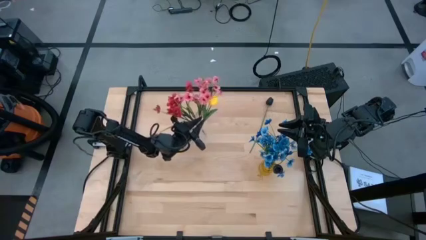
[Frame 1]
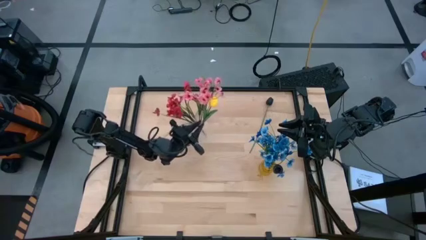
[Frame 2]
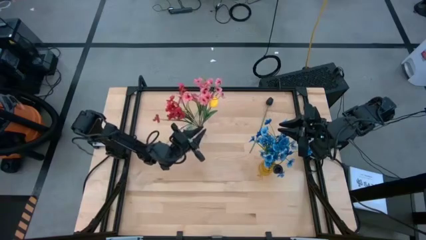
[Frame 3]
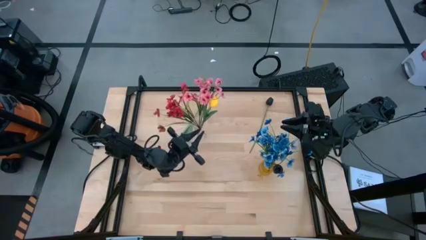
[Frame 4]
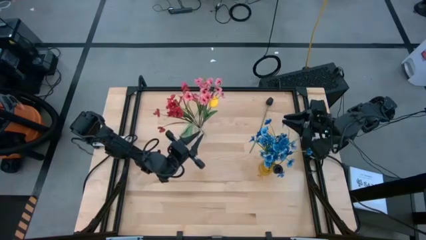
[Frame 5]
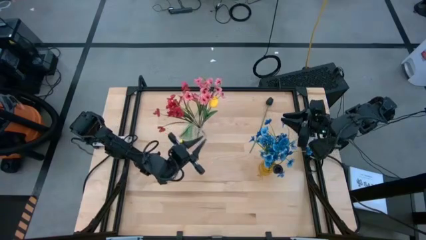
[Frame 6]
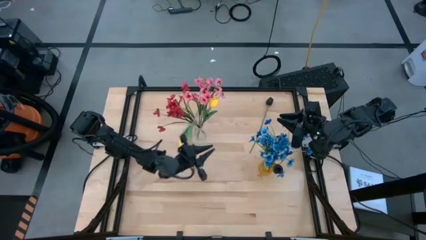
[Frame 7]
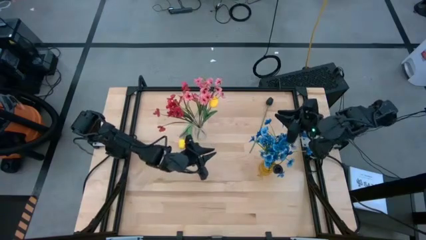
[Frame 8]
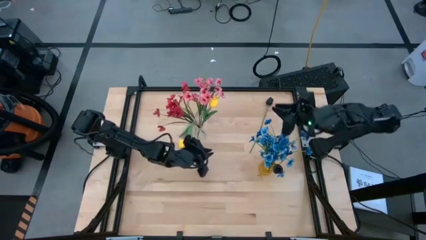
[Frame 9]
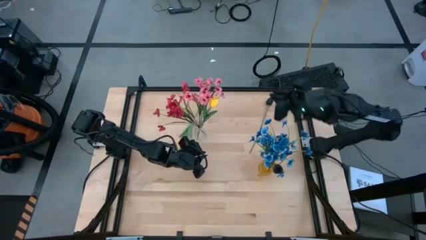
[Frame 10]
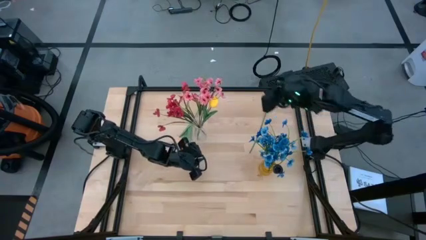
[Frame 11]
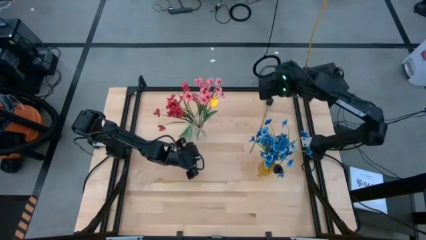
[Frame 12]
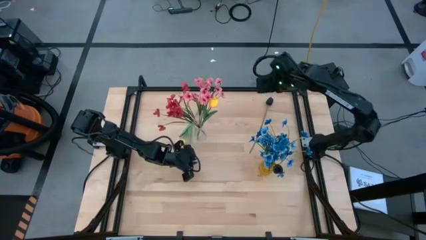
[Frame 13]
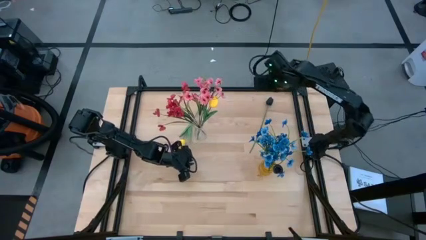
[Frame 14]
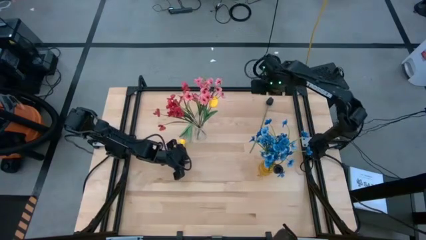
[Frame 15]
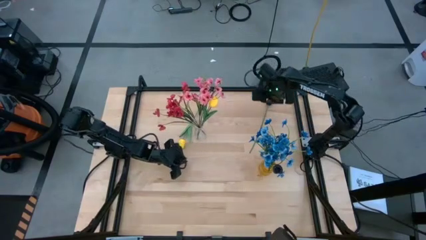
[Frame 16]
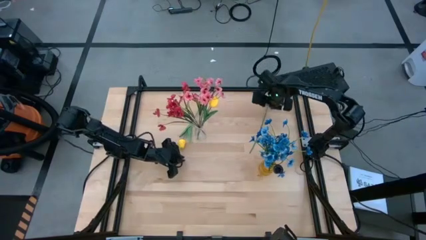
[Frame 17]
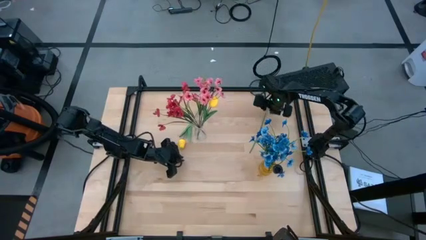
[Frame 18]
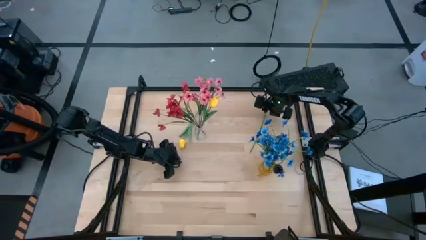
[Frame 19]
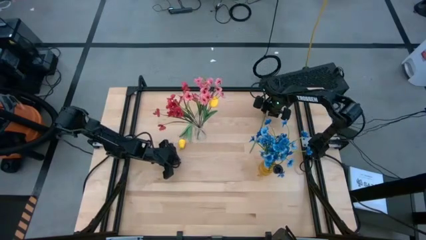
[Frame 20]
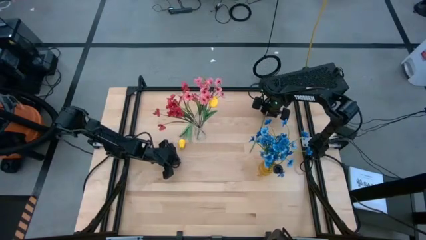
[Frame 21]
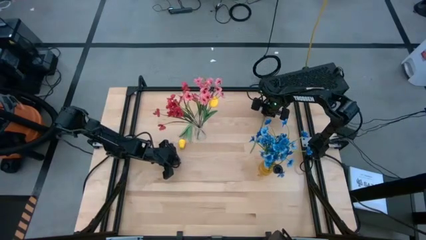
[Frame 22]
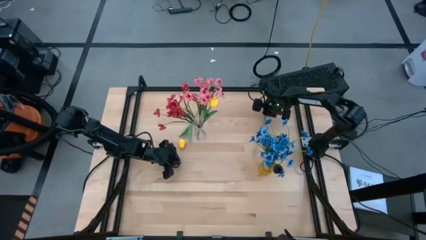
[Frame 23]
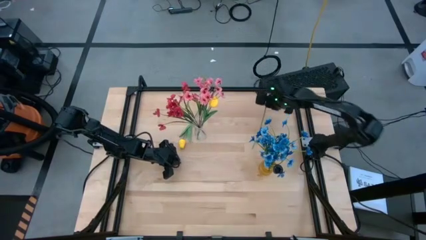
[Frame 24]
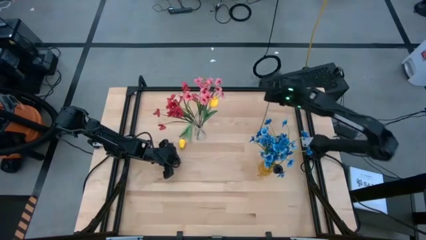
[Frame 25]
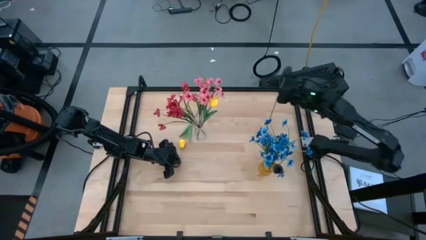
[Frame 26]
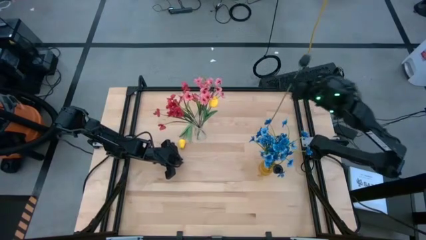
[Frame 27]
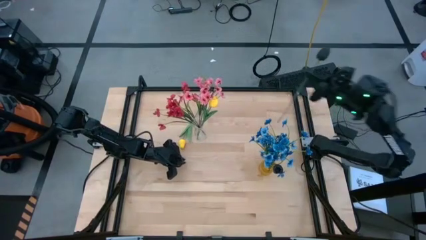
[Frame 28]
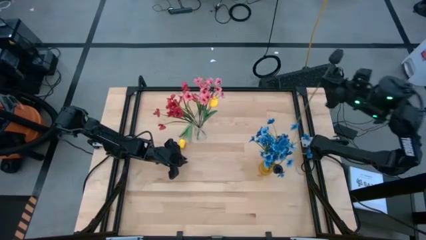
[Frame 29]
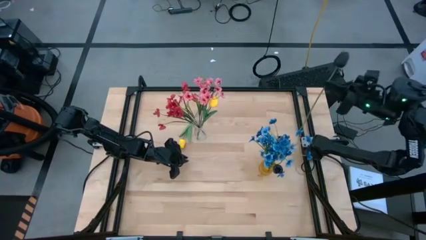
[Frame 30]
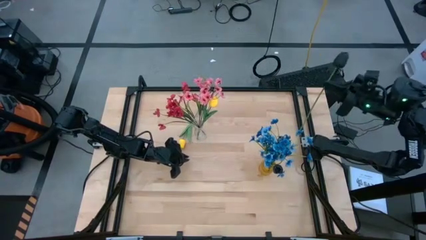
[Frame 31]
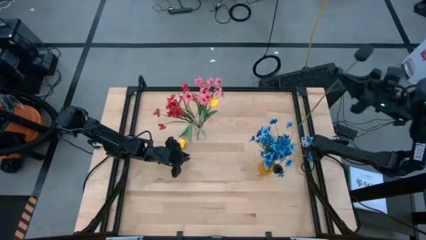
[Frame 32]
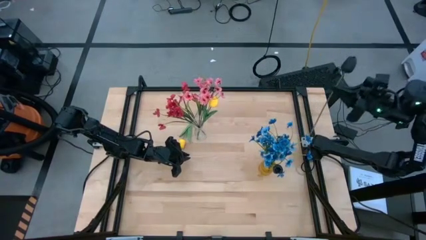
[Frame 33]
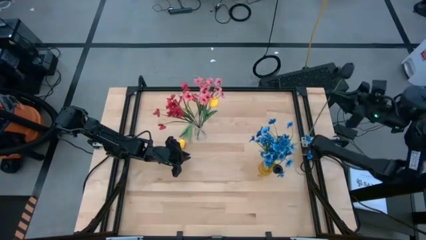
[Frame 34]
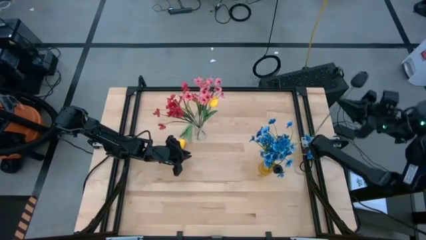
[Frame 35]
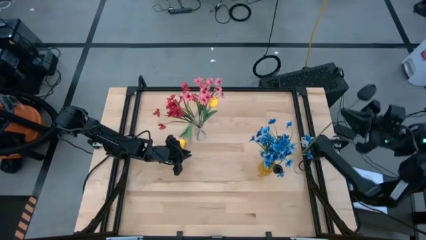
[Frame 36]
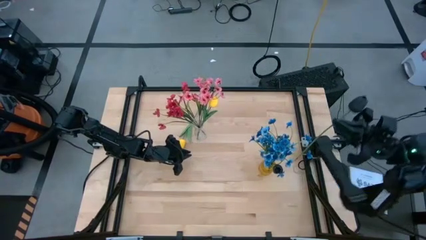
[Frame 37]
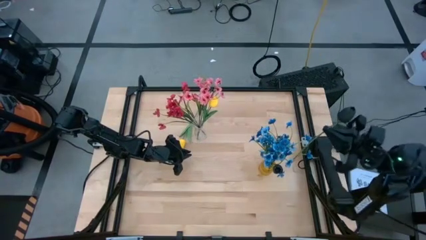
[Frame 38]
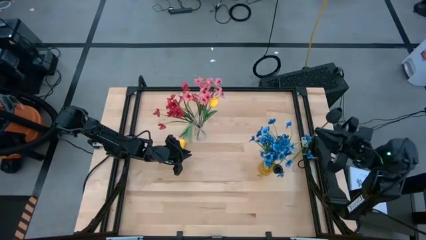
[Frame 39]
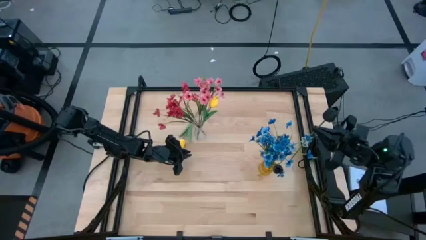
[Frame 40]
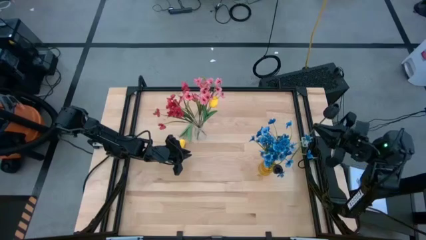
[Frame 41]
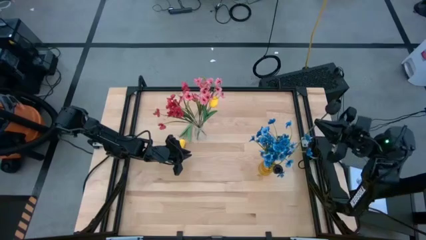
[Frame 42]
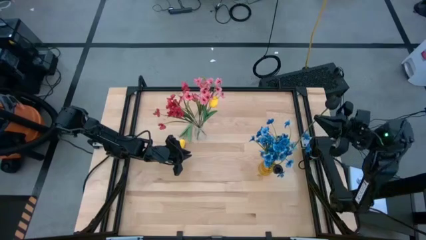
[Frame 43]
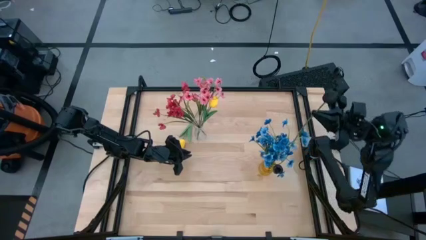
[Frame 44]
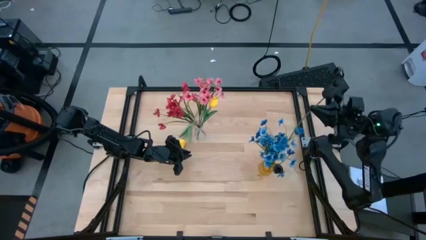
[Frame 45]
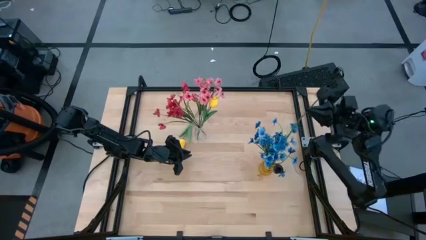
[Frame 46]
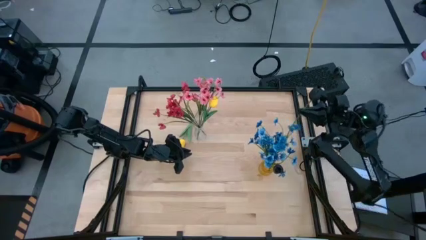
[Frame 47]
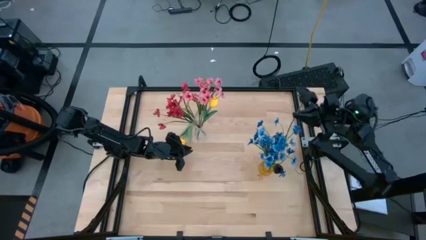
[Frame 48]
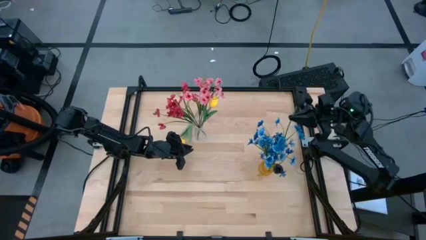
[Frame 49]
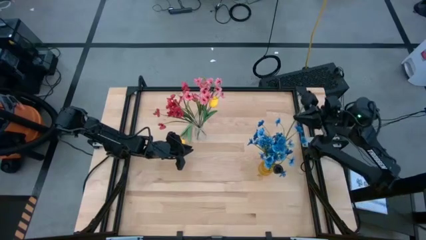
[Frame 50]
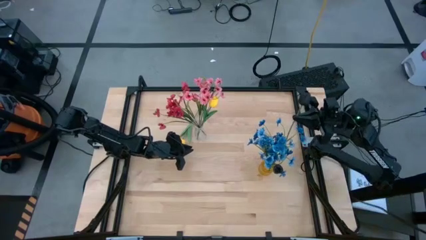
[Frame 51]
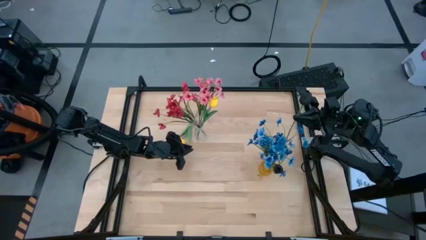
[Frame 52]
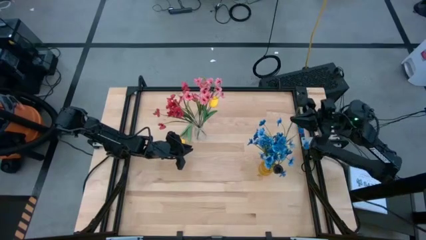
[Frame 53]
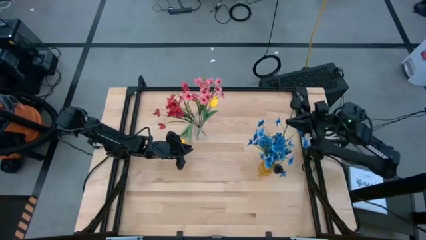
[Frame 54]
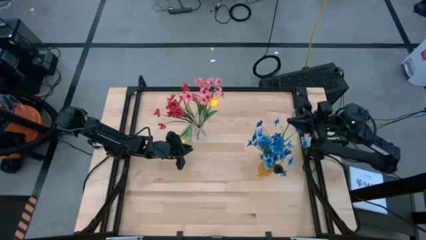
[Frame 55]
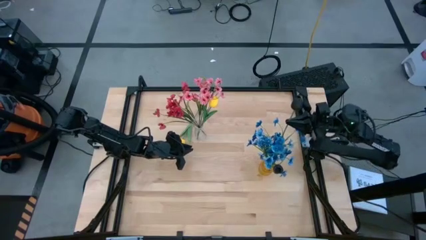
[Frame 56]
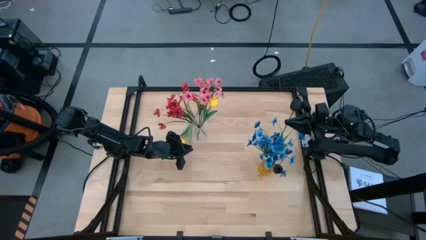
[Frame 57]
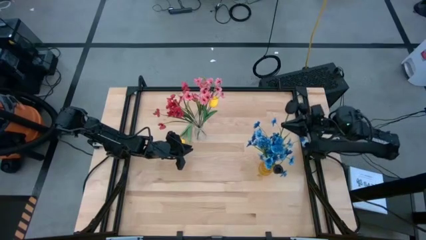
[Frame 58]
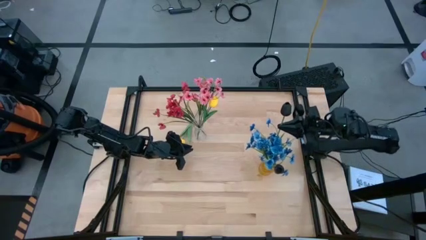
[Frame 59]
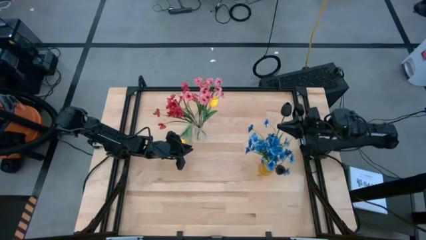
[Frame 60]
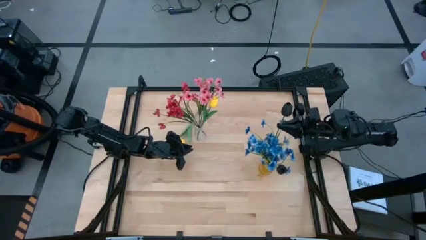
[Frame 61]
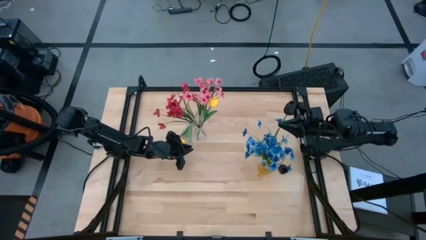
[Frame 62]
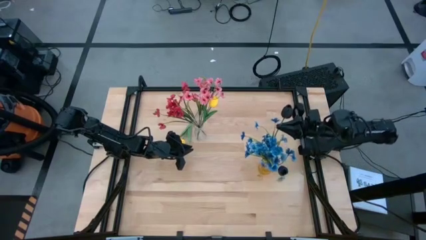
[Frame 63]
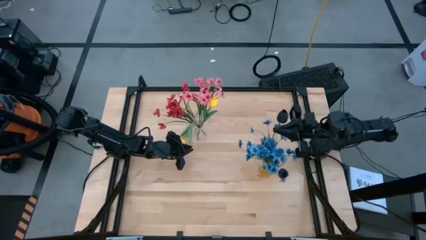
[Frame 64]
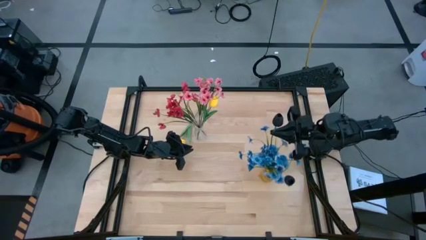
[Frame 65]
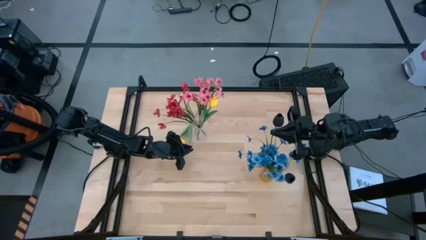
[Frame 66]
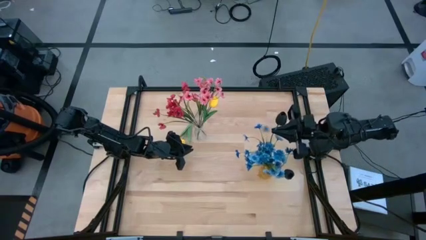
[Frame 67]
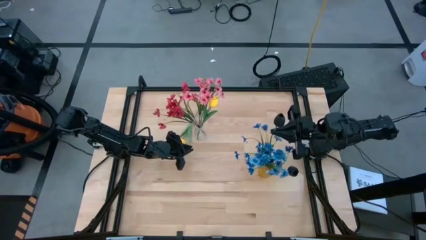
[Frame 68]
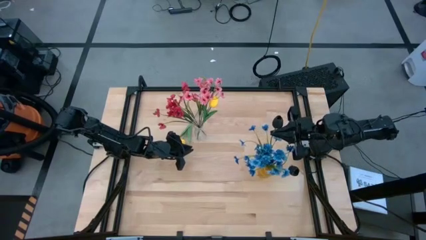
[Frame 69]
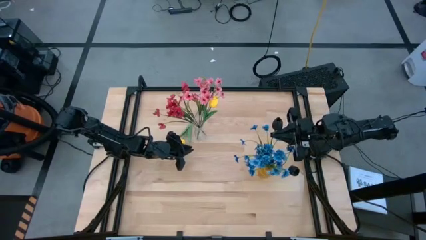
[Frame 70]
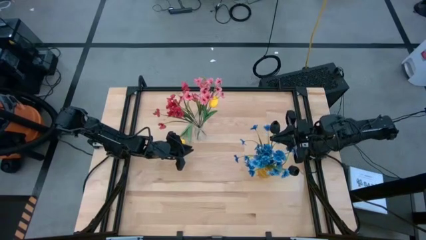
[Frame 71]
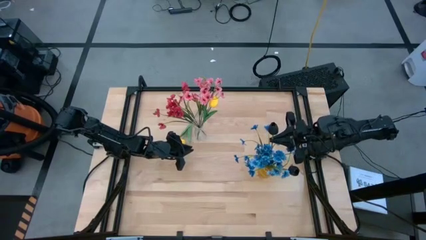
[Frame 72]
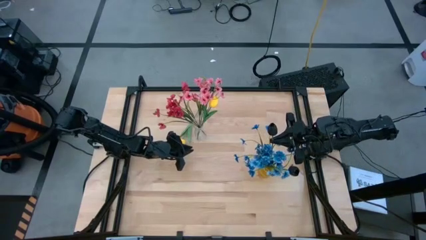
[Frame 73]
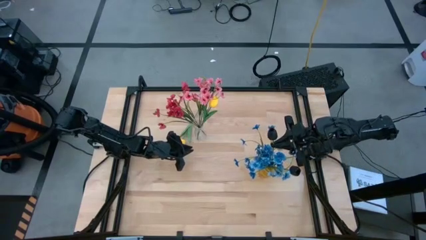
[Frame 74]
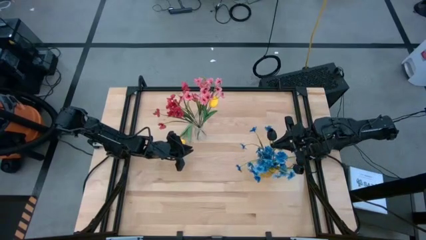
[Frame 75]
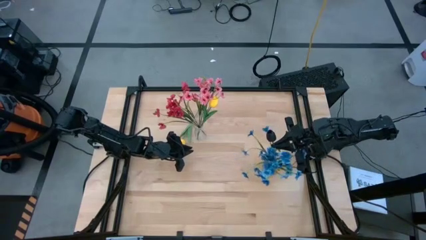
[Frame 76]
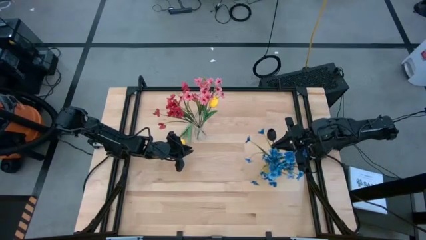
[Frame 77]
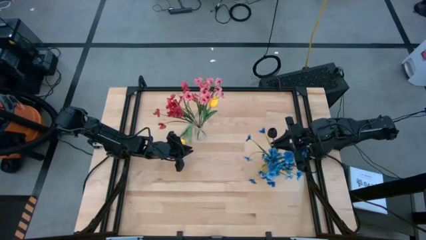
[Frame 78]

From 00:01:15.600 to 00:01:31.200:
Task: Sort flowers into vase by color
Put the black flower into the yellow vase
